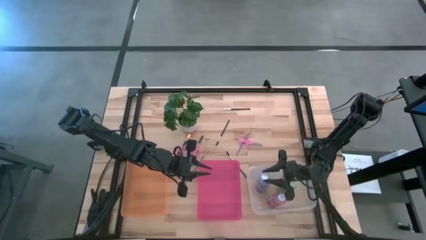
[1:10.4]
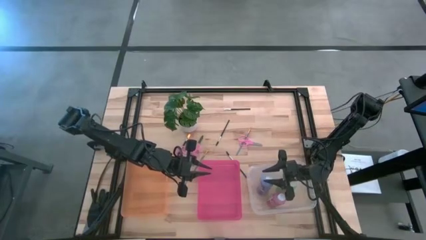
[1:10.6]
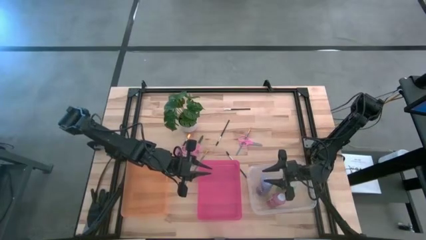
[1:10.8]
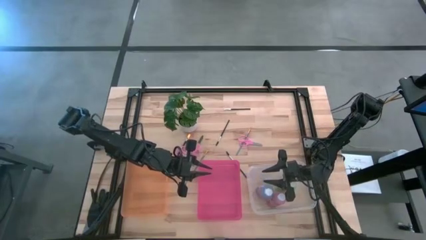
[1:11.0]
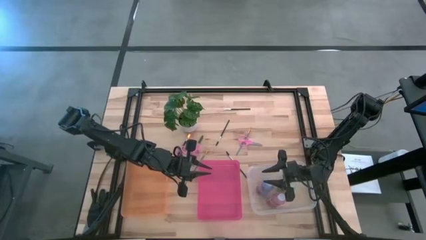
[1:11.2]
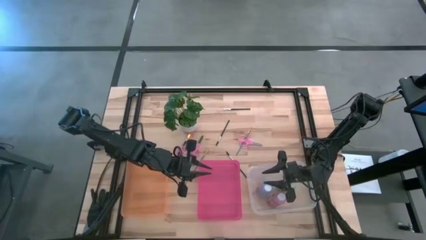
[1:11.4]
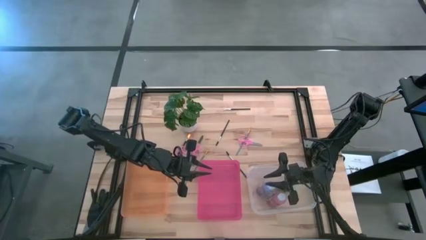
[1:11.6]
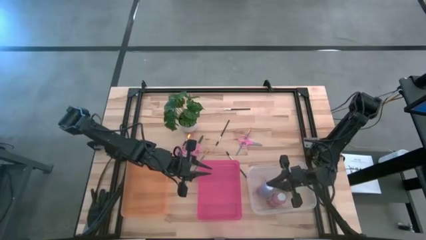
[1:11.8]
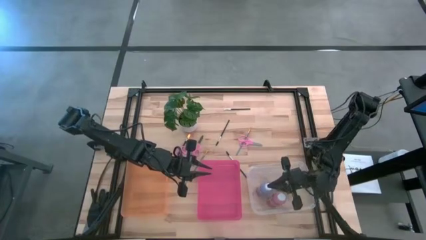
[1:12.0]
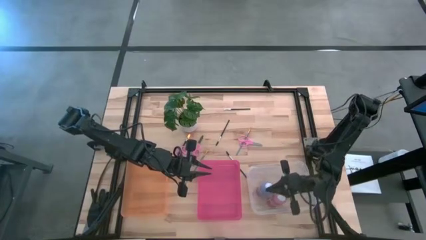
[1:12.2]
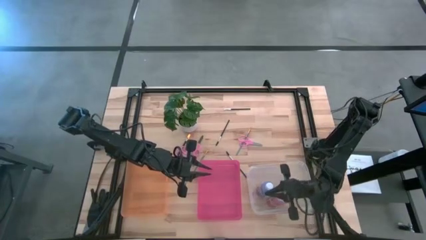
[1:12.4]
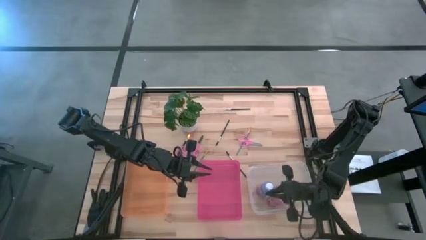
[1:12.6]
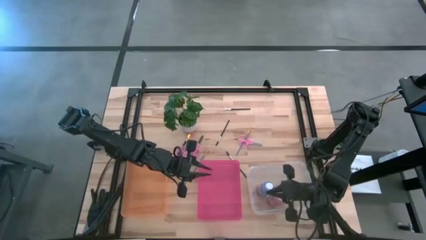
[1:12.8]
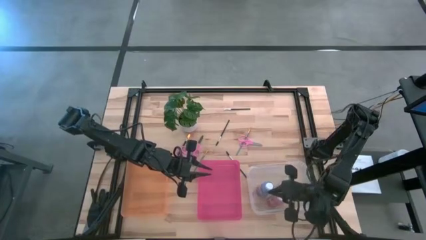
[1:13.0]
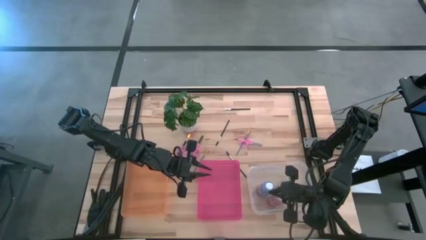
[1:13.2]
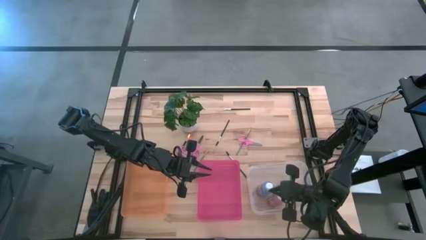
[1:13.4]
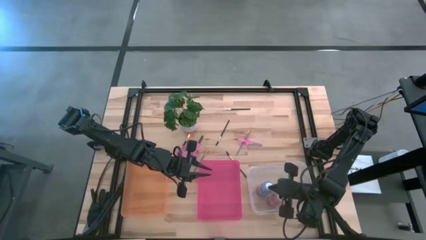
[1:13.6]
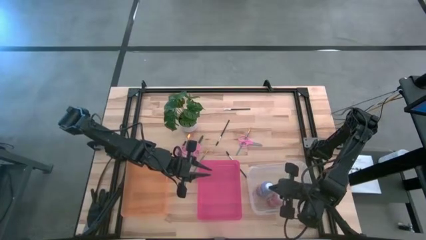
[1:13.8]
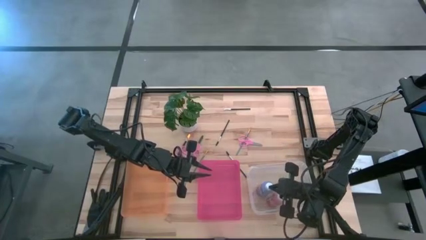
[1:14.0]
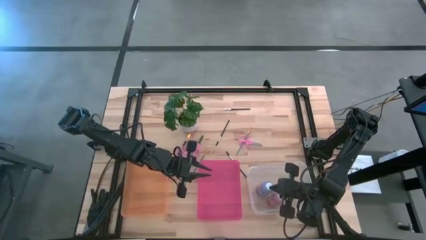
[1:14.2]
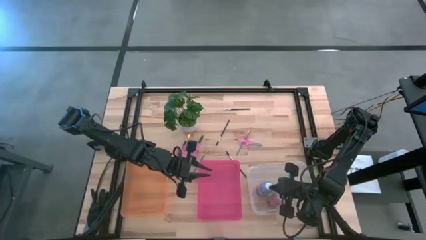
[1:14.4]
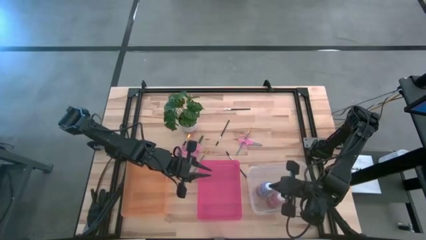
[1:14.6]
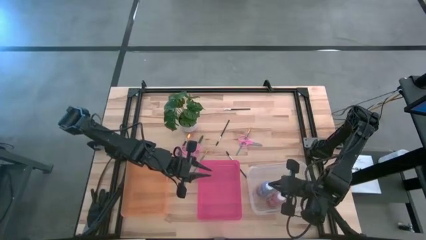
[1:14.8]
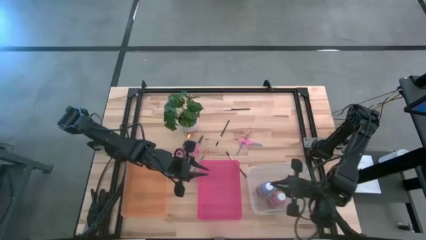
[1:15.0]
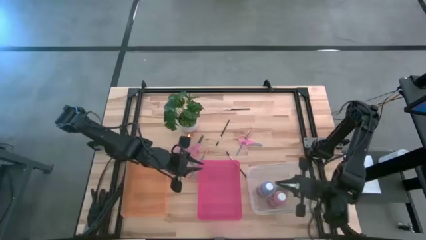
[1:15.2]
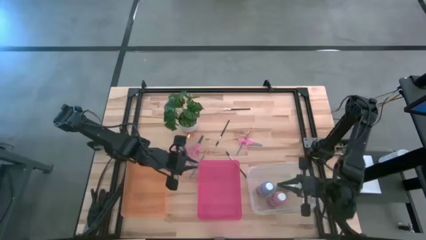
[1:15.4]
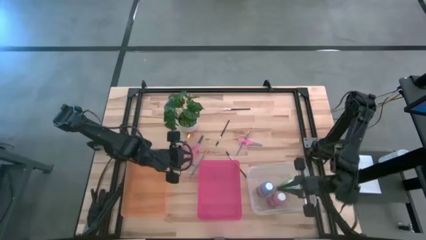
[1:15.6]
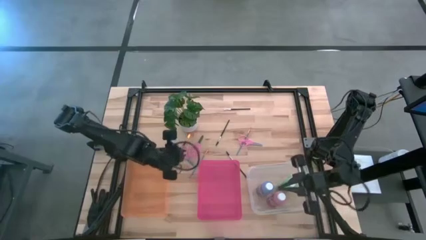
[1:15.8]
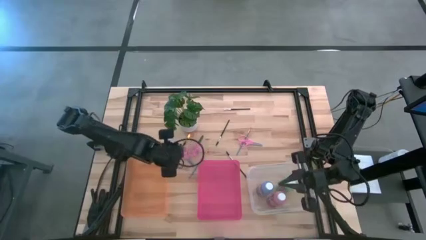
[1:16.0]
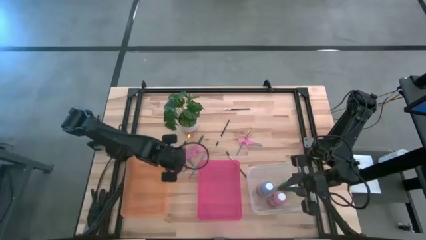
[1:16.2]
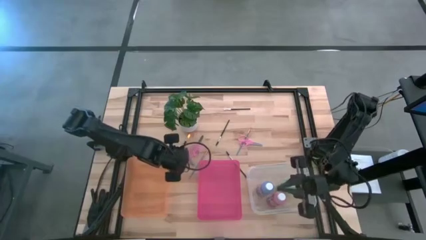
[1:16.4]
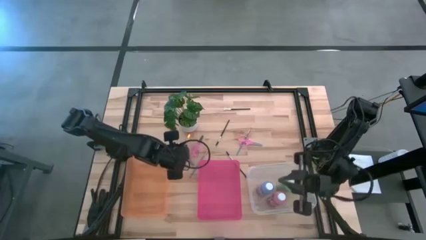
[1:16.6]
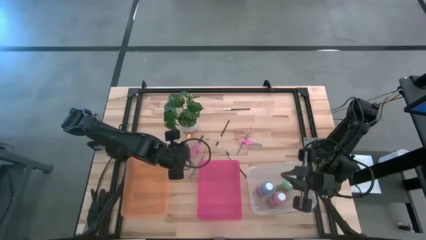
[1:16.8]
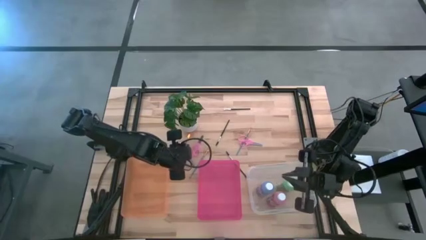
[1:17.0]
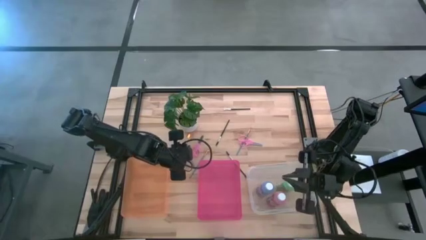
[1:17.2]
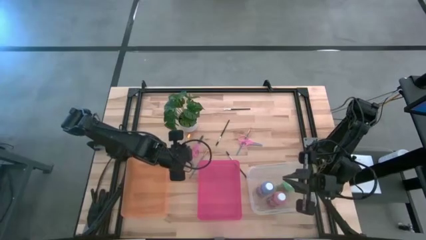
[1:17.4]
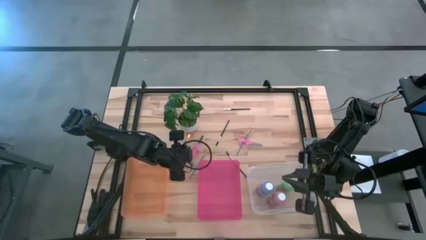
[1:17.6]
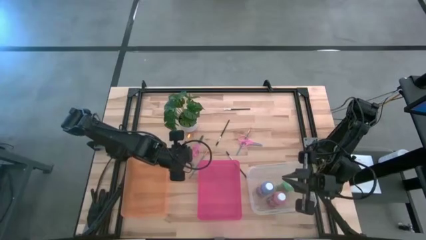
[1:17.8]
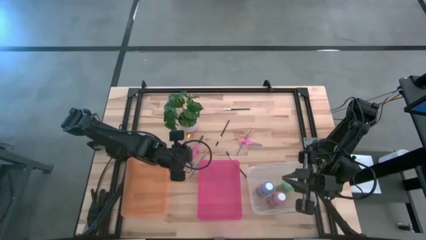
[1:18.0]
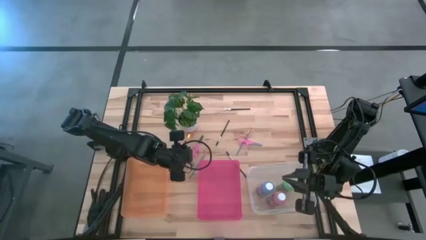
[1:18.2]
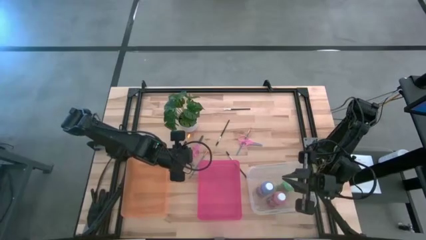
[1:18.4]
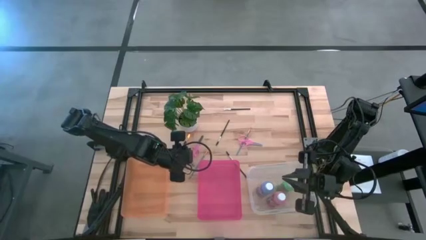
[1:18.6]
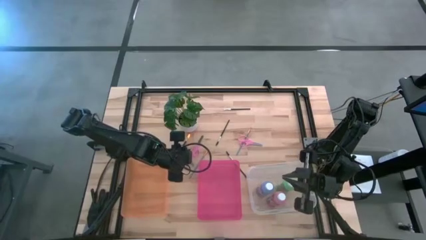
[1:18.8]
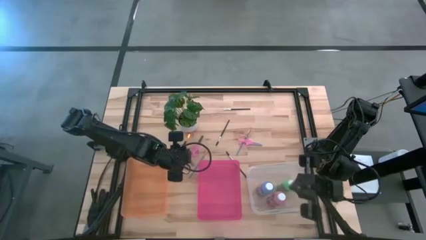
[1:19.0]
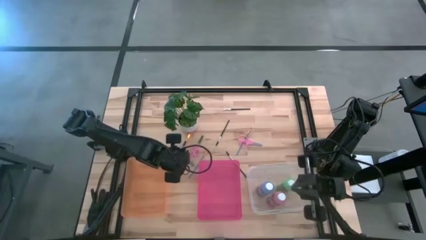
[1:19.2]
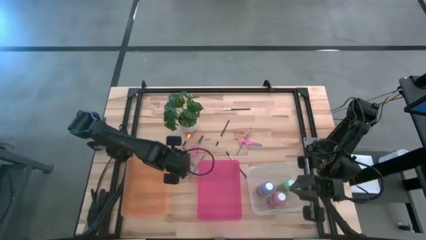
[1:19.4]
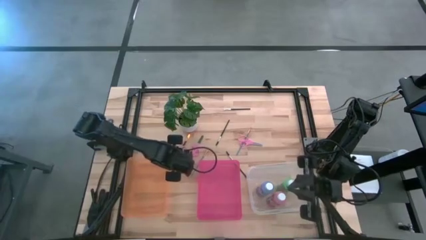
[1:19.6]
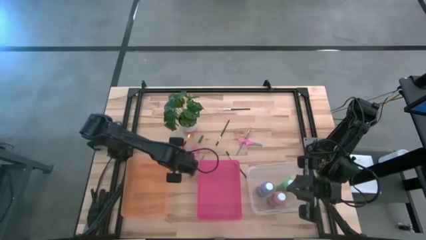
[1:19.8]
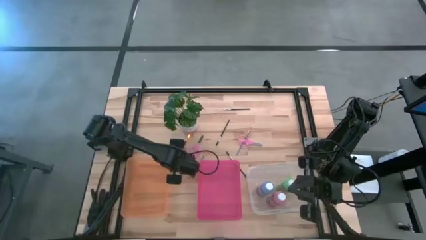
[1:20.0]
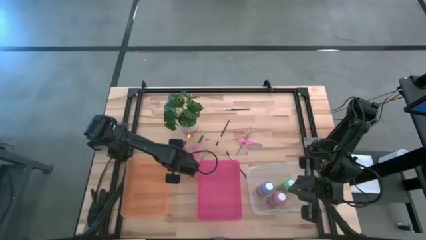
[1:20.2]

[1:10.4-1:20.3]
Task: Pick & Place Paint Supplies
Put the left pink scissors into the pink bin

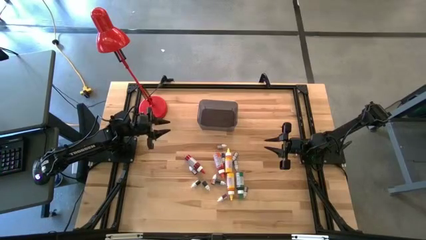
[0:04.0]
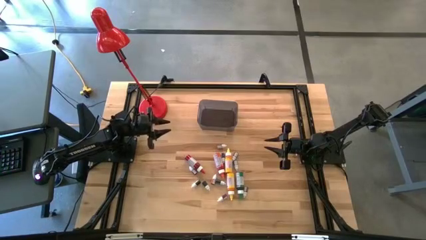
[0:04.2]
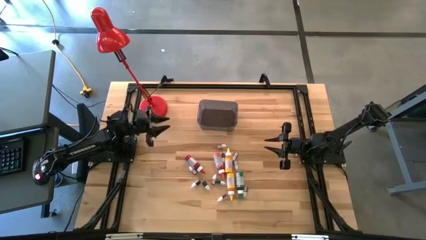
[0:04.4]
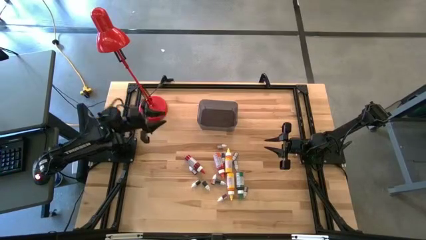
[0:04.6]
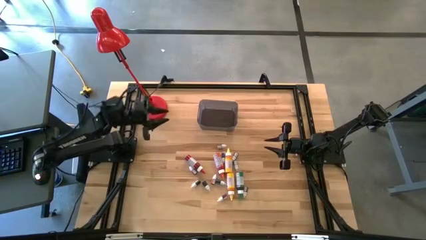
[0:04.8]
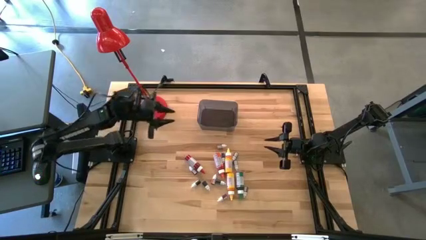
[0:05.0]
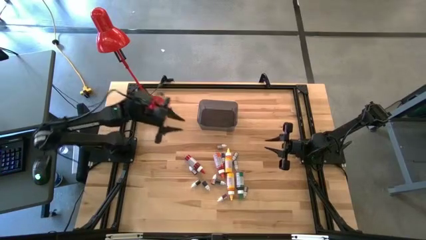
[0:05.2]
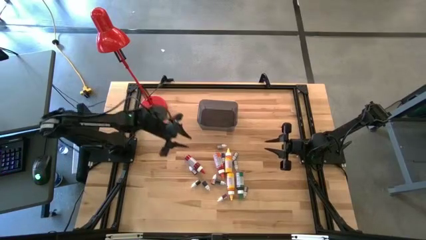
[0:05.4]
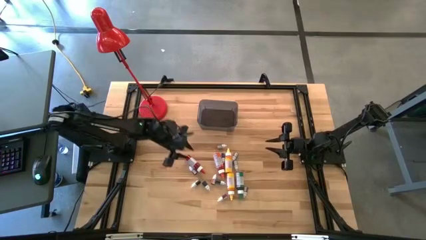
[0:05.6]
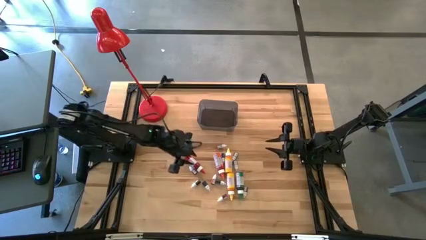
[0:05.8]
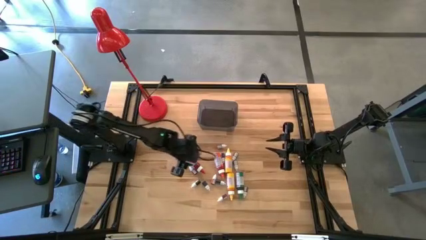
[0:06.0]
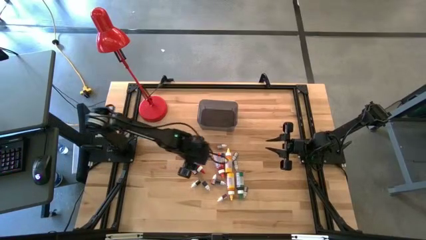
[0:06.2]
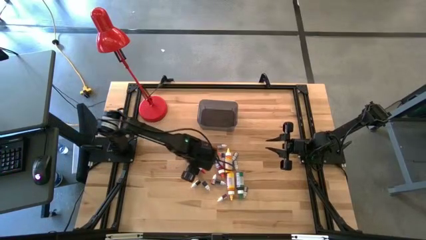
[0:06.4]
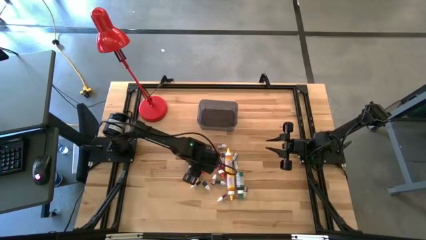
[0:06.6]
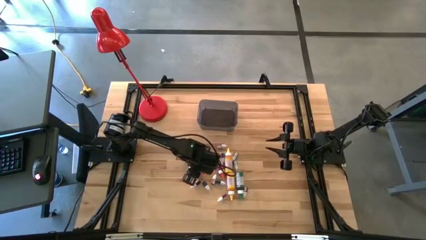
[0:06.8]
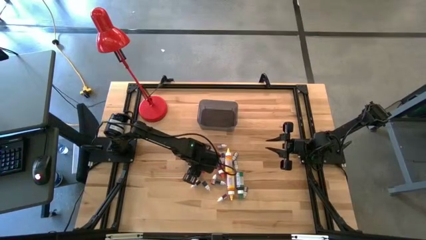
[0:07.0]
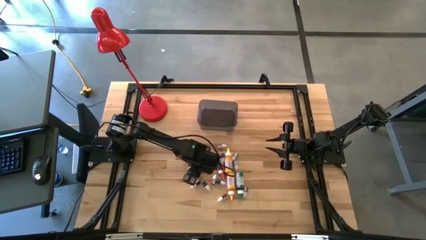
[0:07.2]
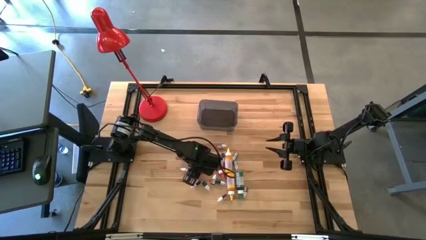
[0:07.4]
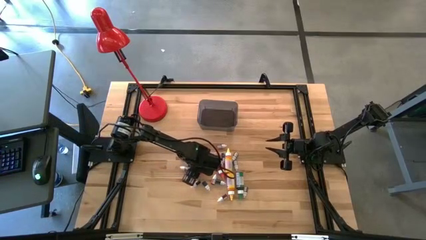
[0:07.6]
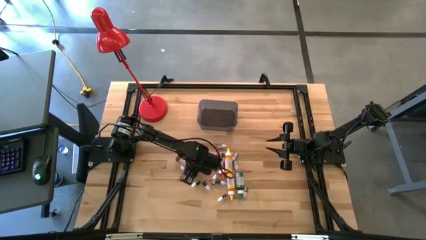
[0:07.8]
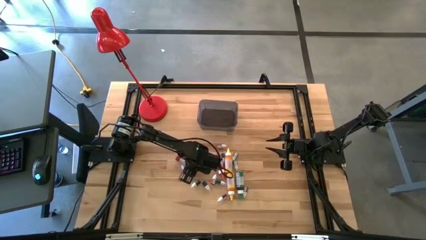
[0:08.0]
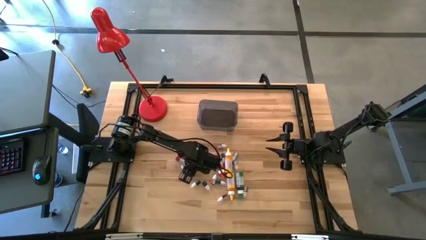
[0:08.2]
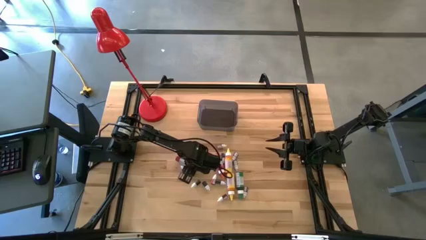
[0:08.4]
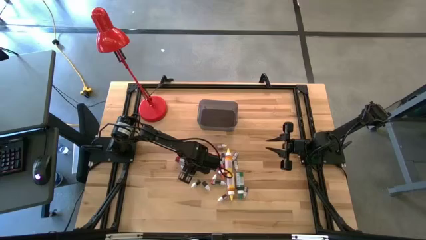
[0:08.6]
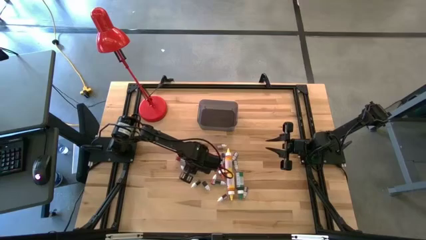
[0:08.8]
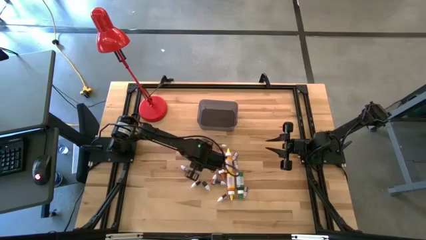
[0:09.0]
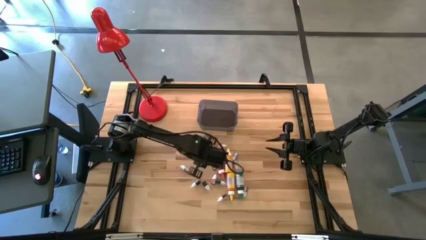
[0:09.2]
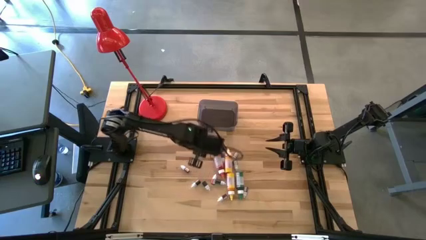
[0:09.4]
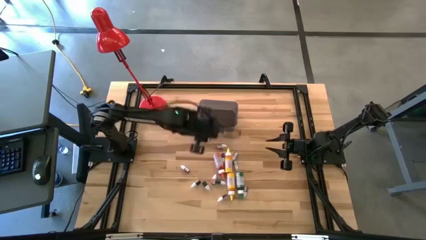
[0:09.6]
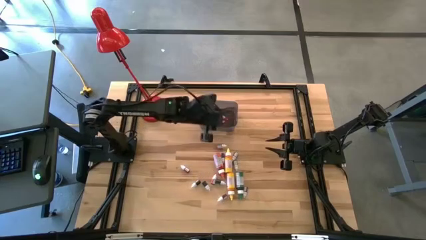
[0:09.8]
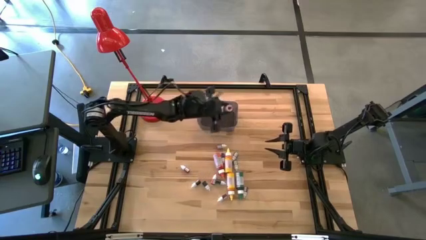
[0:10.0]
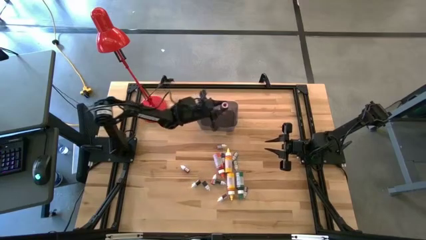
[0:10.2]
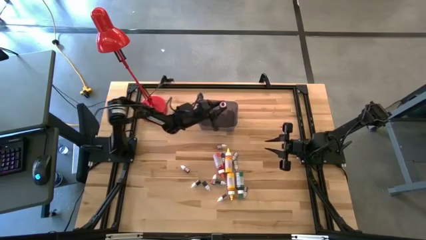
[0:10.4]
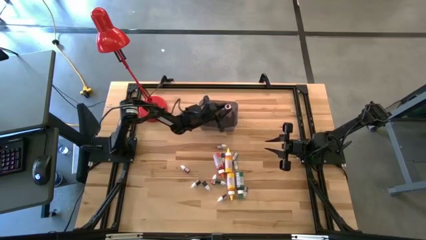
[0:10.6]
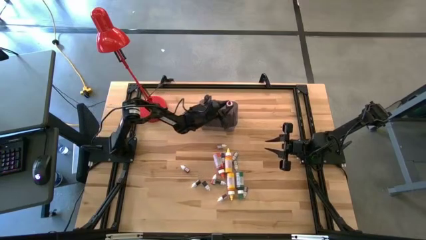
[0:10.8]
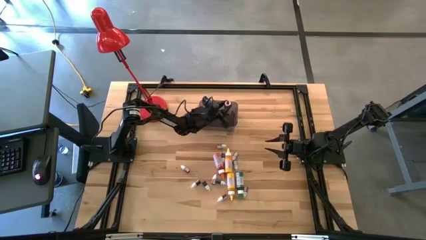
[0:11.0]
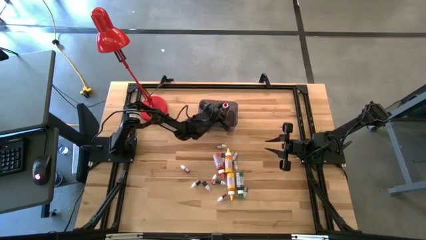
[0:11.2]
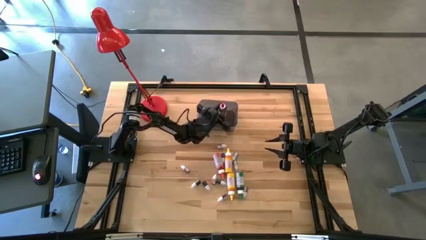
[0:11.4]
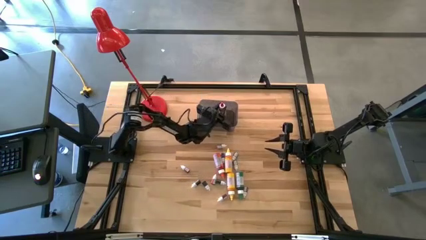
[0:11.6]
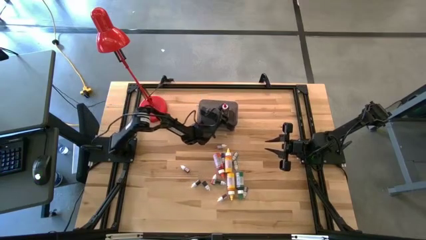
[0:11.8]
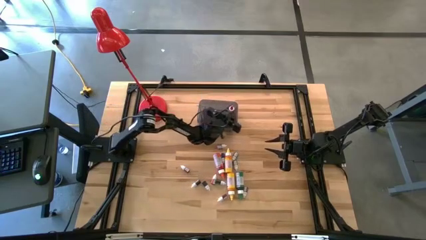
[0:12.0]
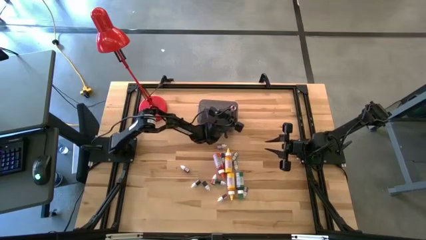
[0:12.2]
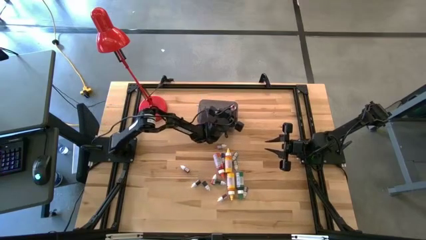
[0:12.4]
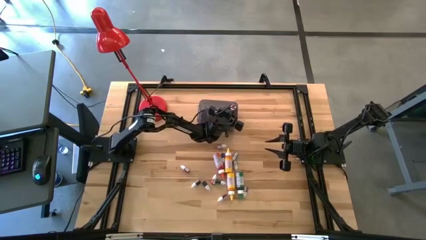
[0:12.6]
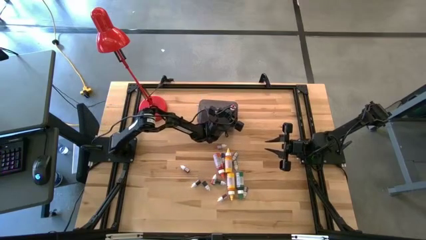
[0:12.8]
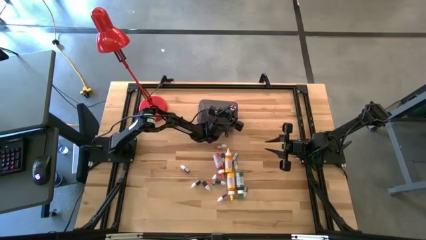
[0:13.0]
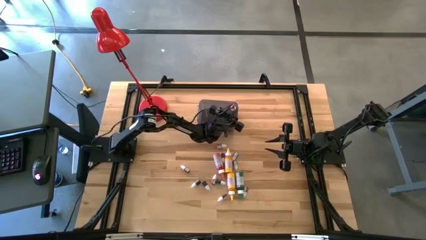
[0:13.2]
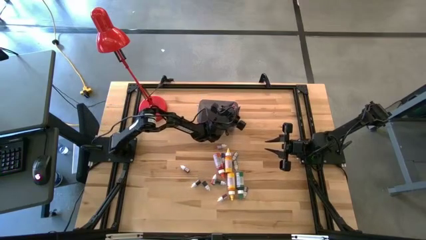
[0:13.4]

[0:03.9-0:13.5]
Task: Pick & Place food coloring
Put the large red food coloring bottle into the black bin
